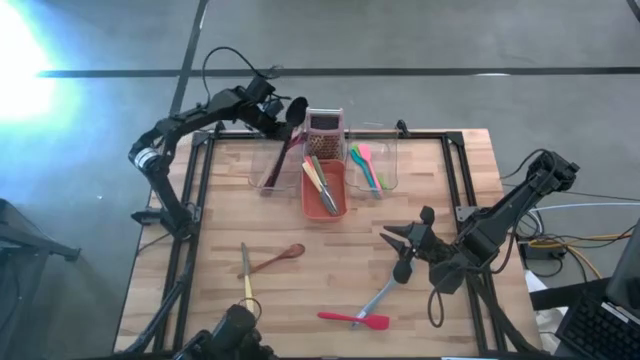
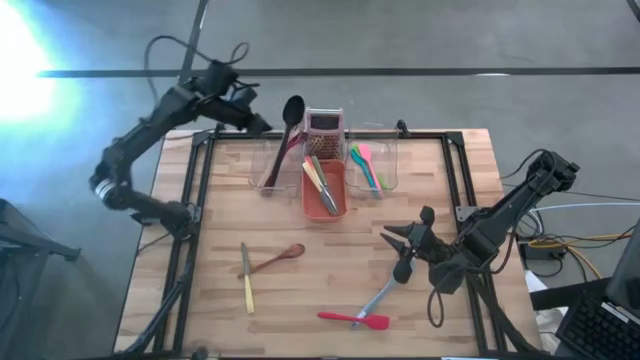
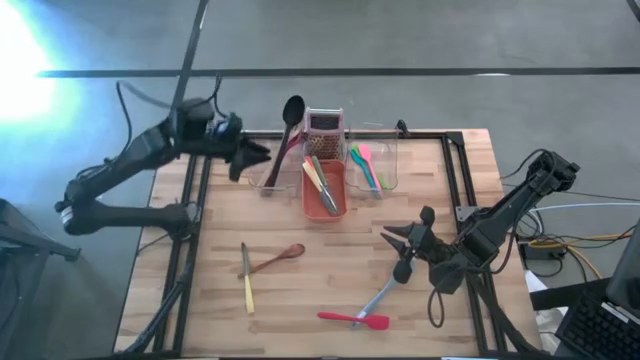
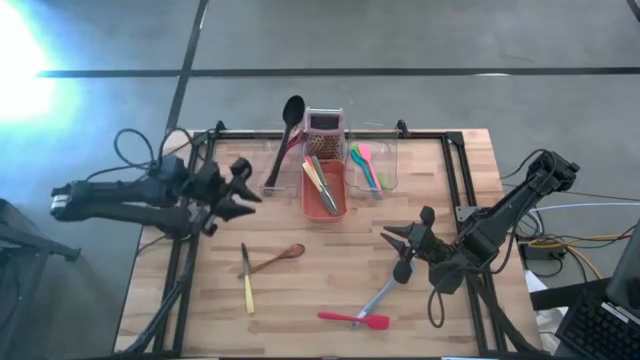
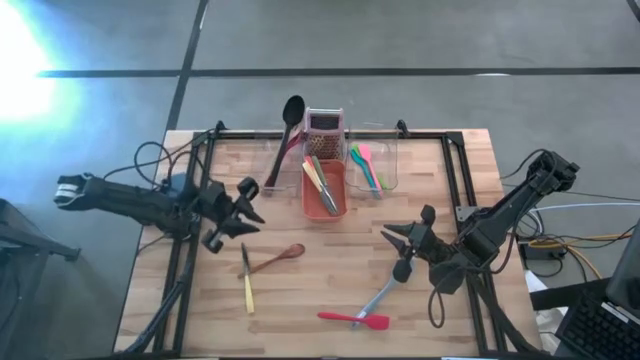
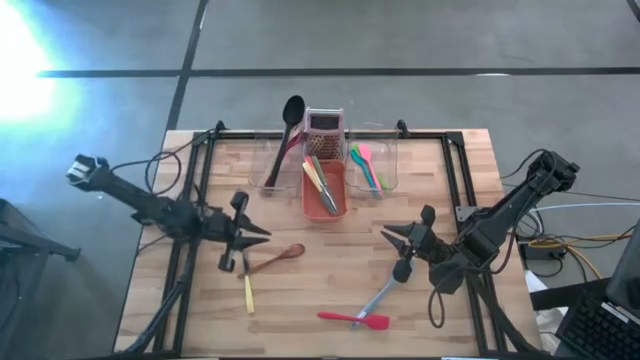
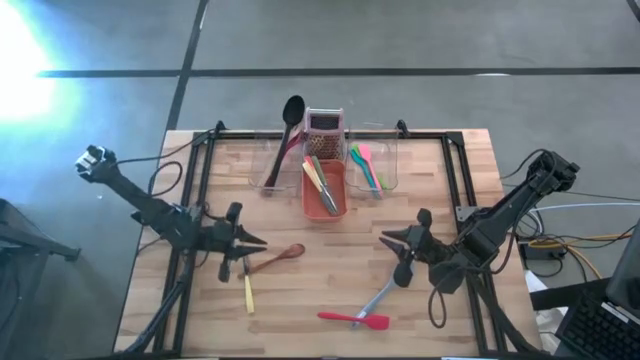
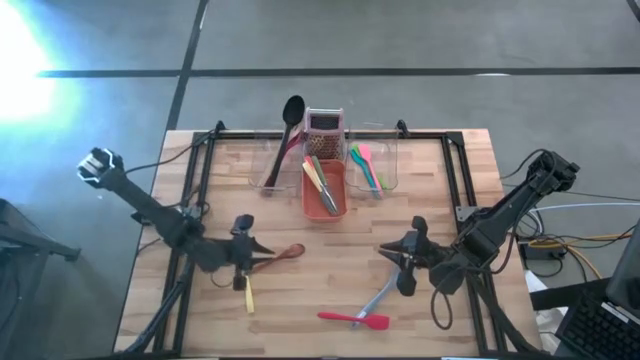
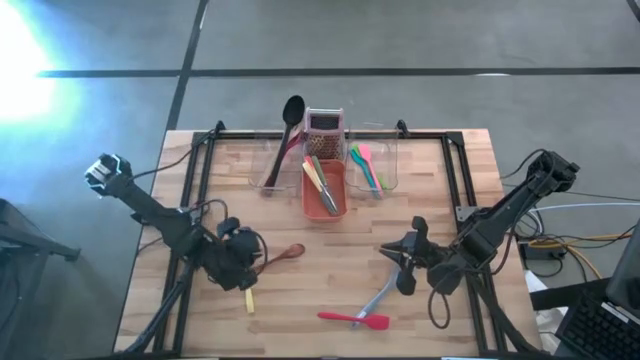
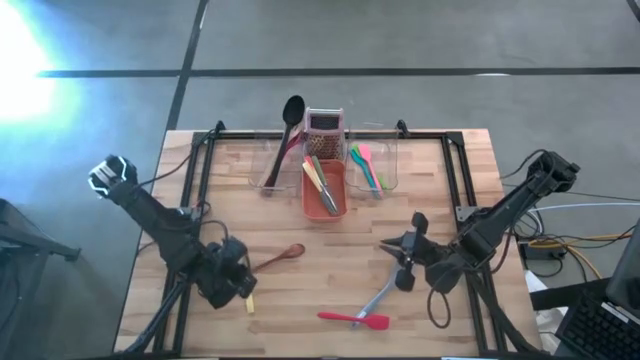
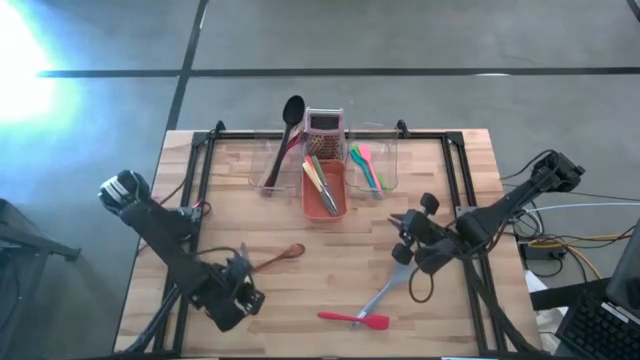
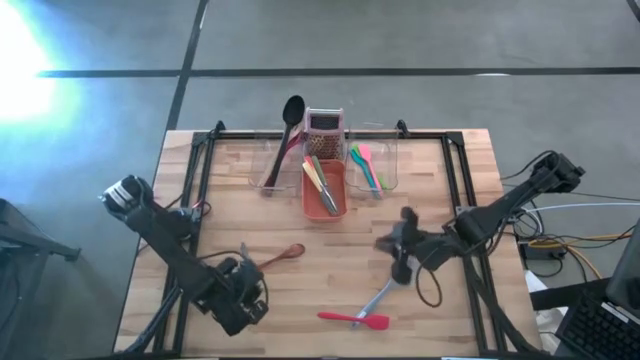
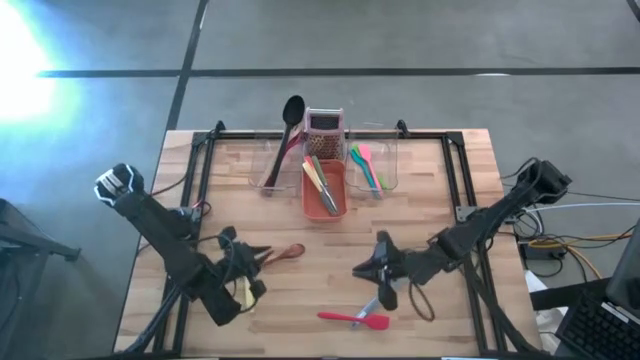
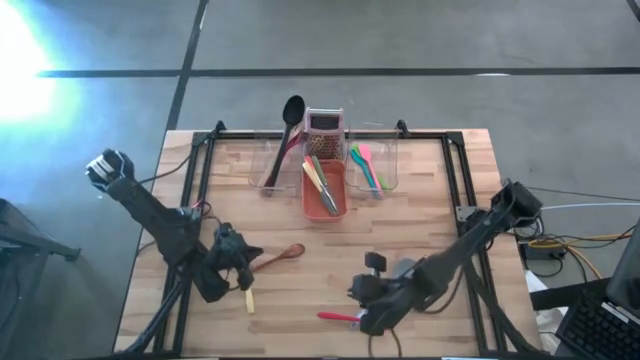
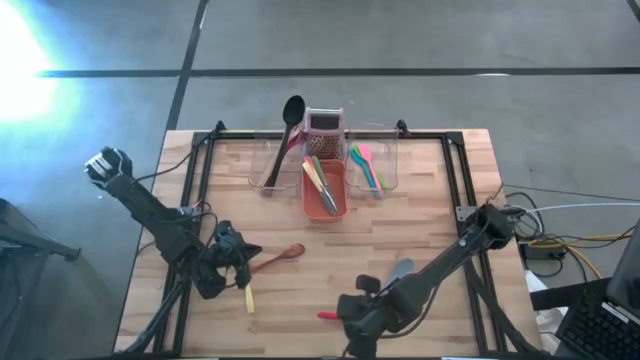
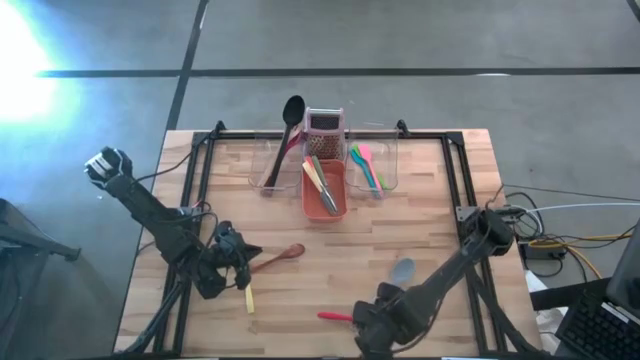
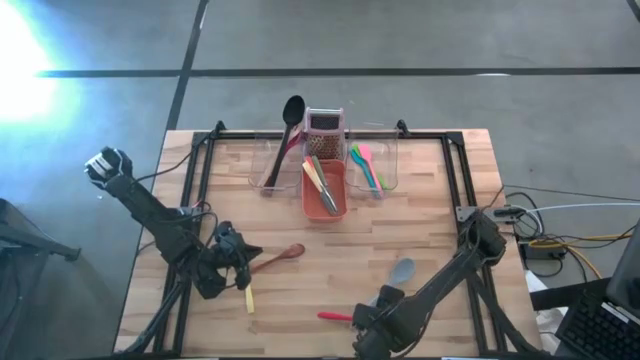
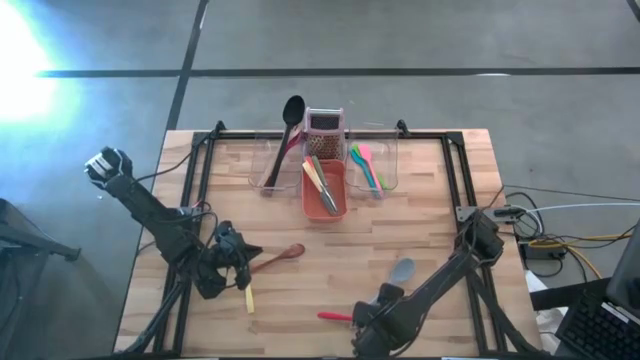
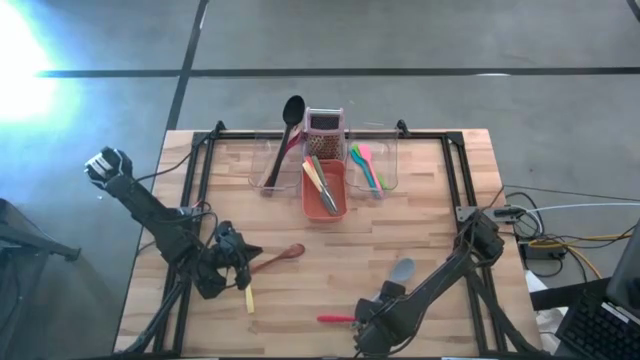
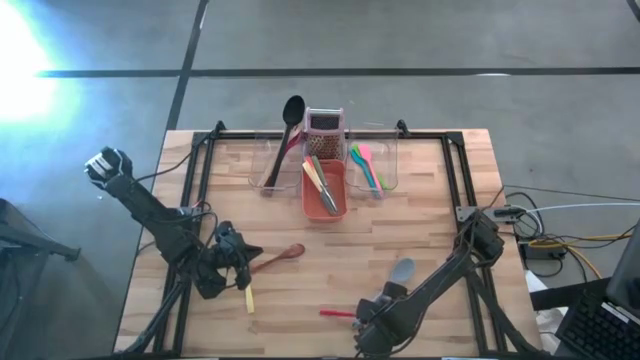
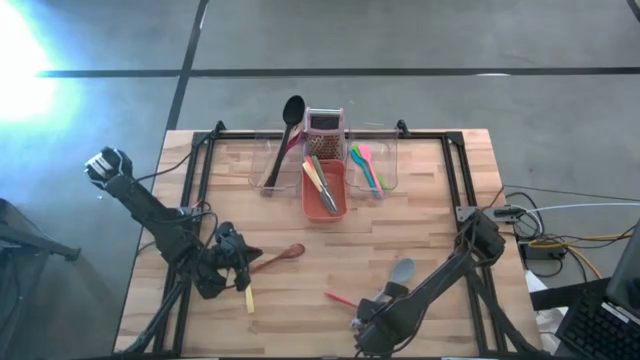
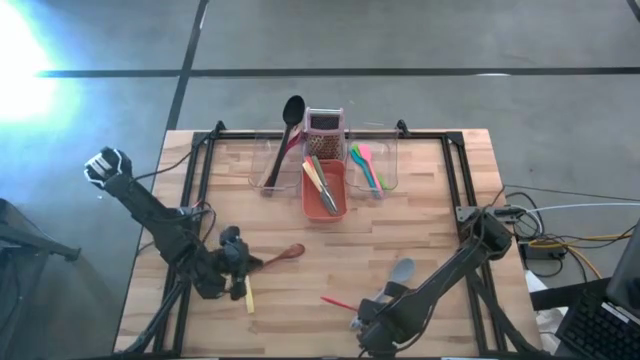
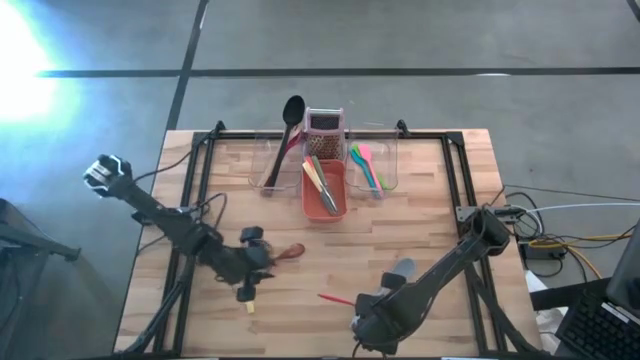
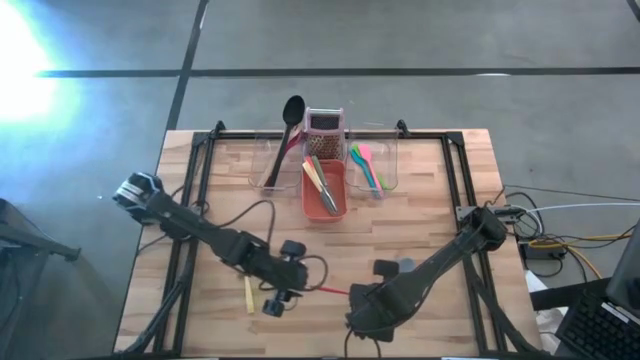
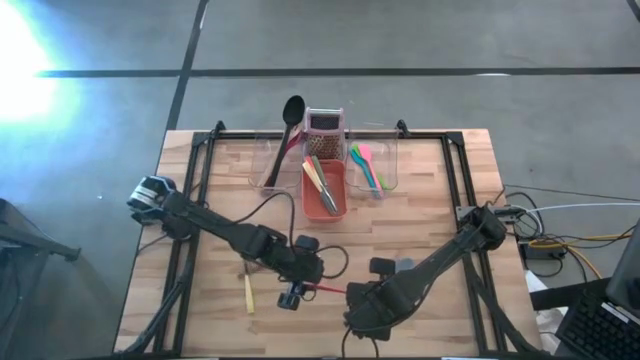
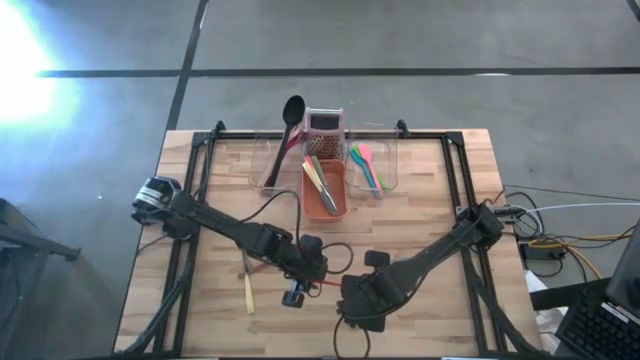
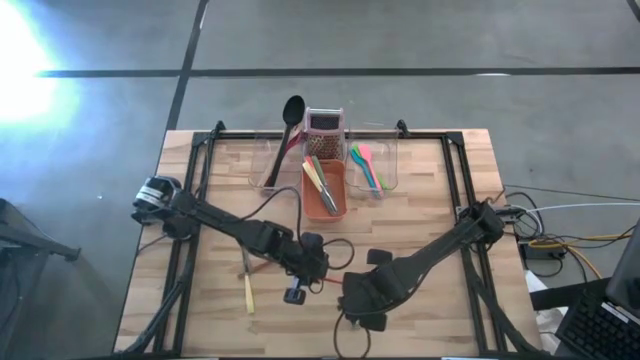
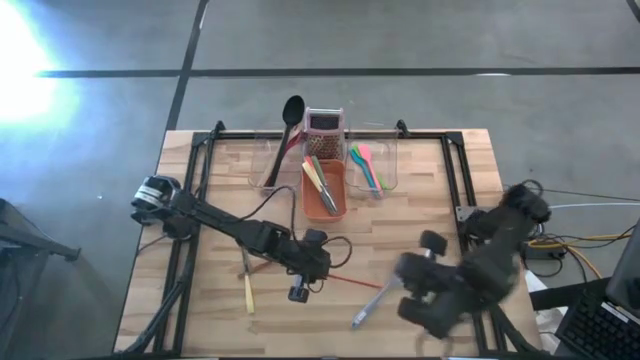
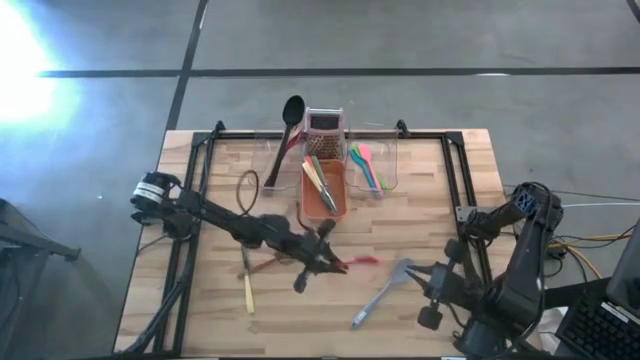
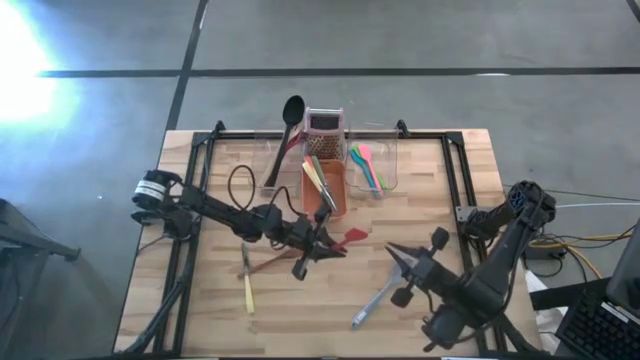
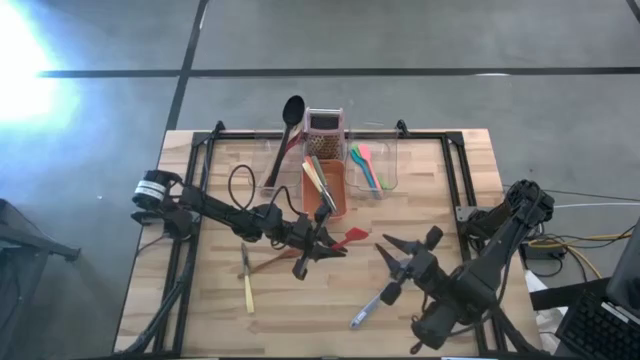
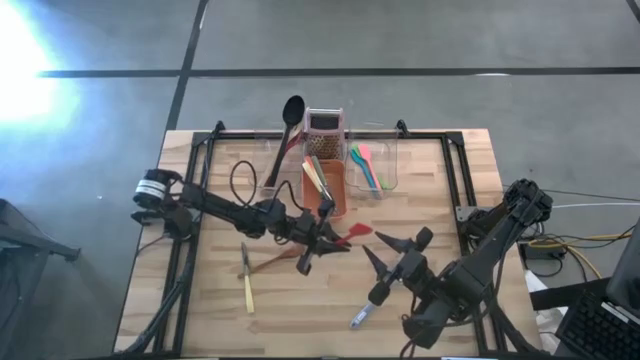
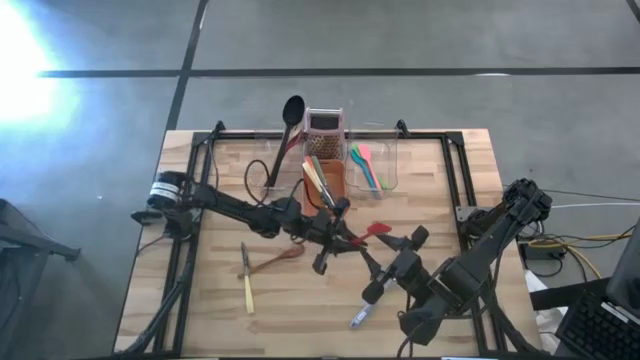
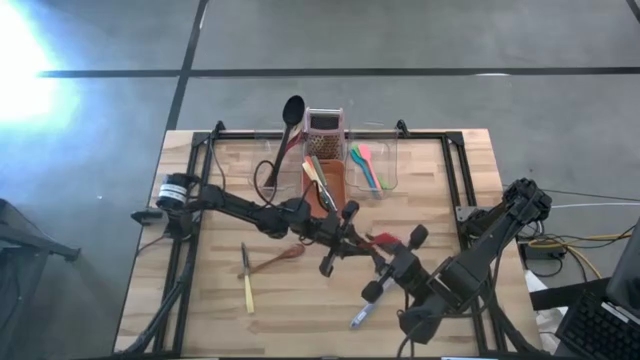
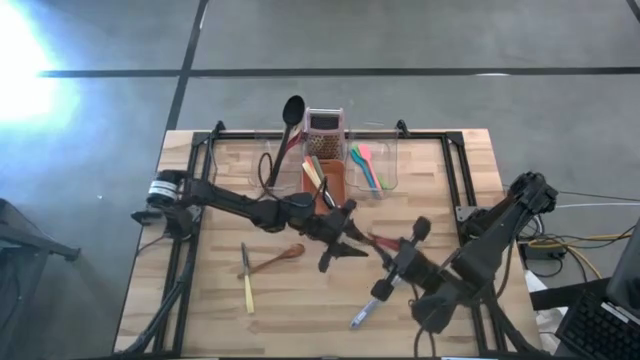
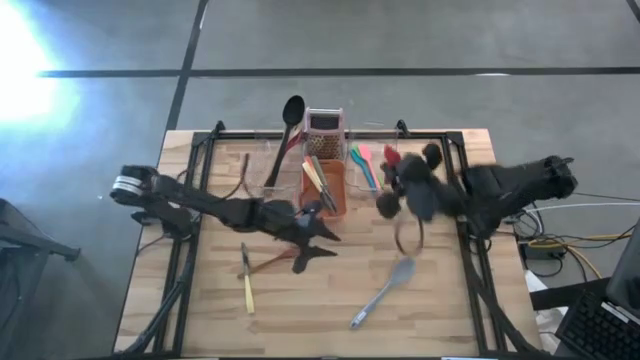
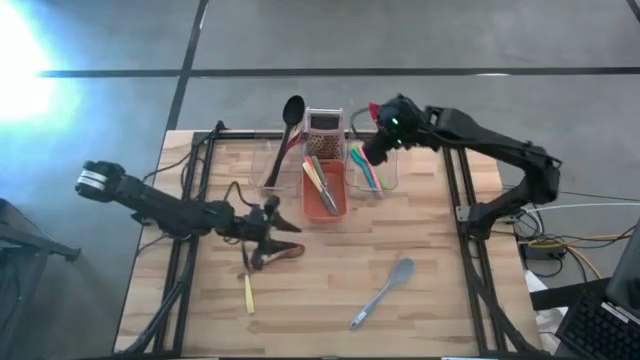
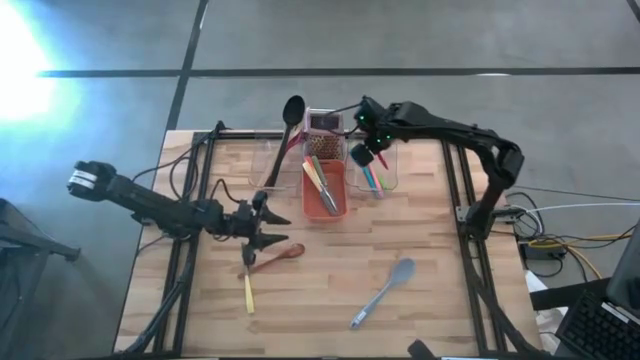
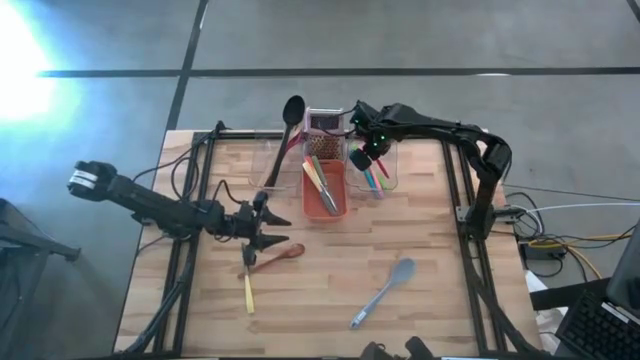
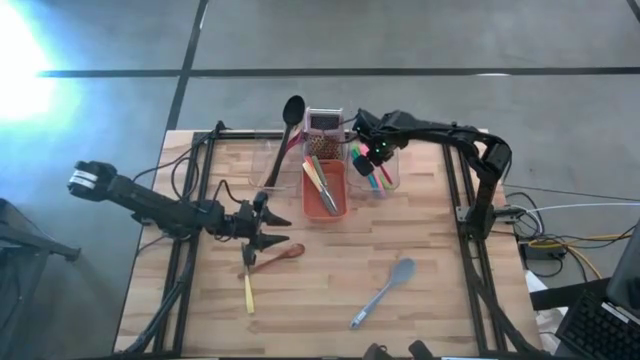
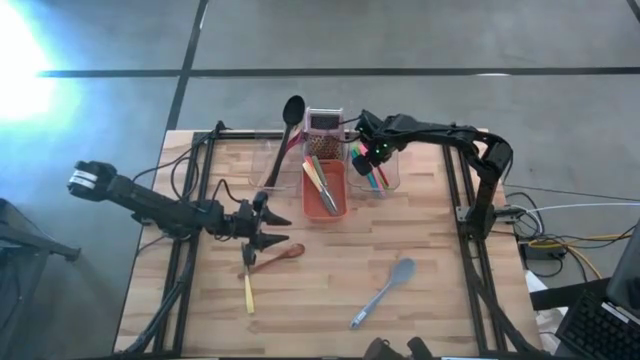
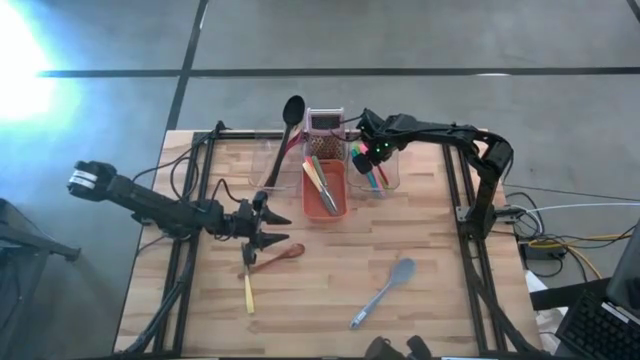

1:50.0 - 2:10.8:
Task: Pick & Place Kitchen Items
Put the red spatula into the right transparent bin

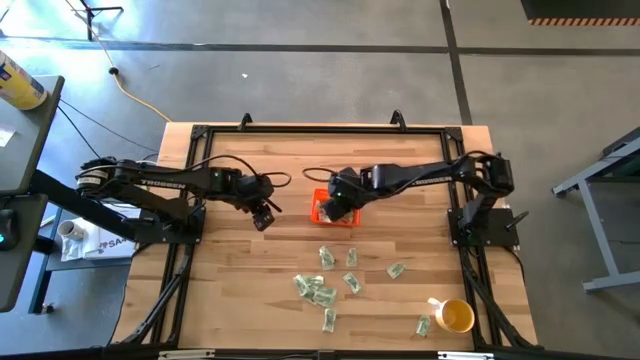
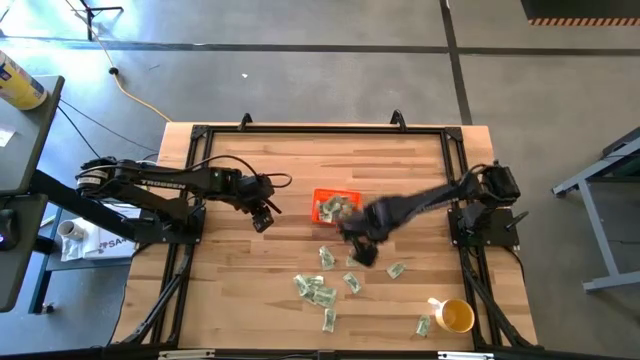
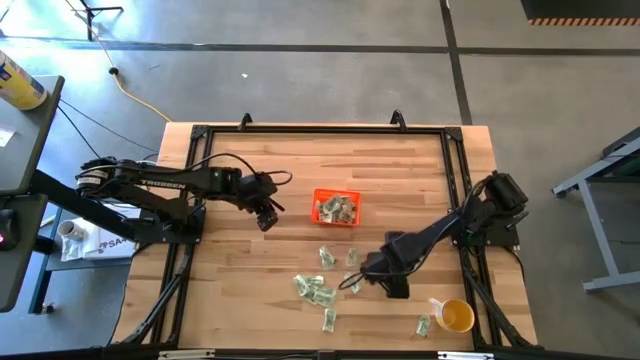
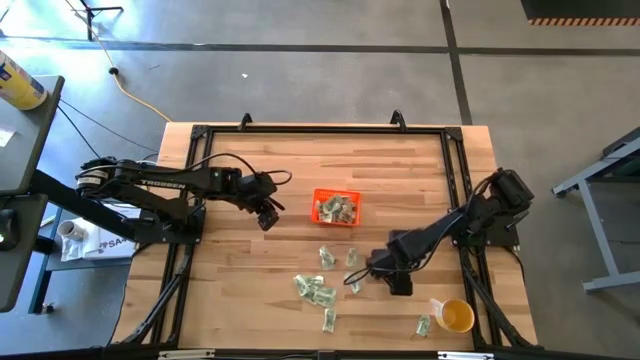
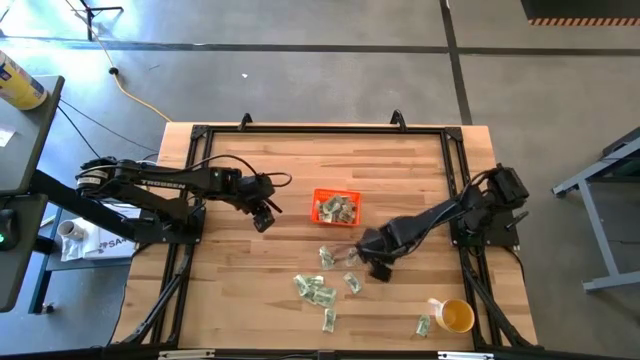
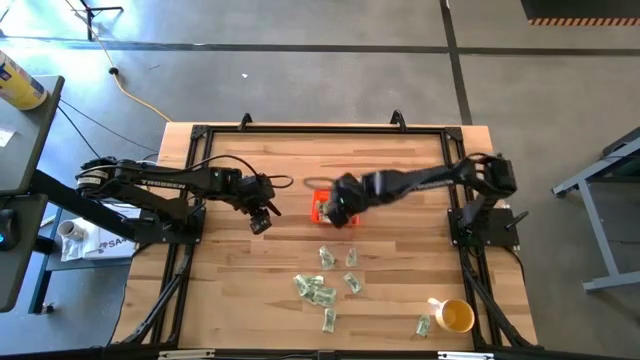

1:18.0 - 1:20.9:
Task: Pick and place Stevia / Truvia into bins
Put the stevia packet into the orange bin
